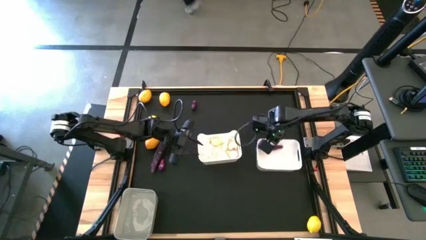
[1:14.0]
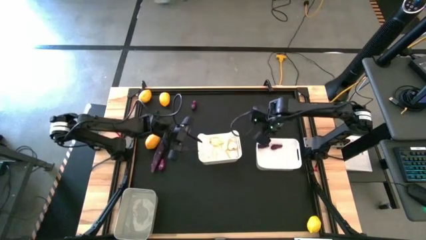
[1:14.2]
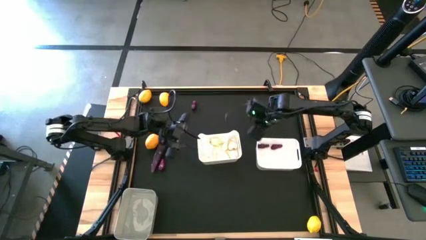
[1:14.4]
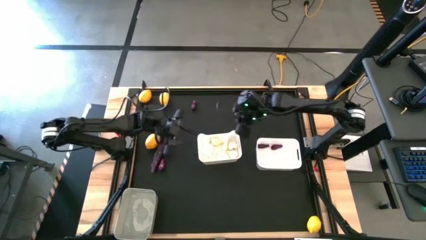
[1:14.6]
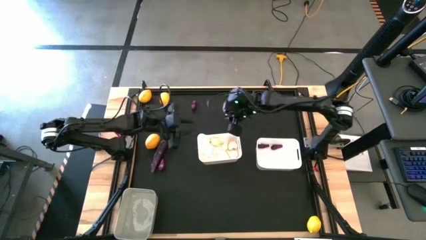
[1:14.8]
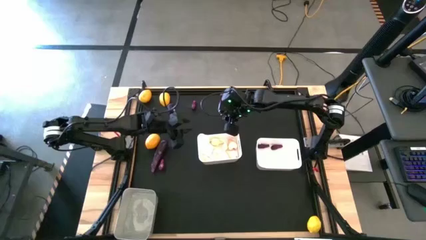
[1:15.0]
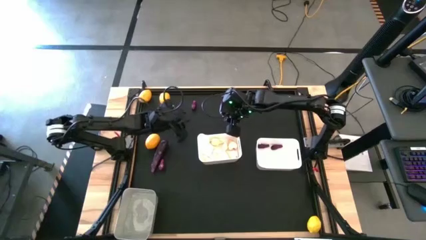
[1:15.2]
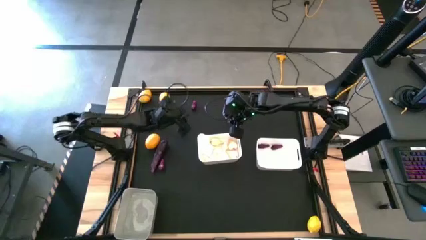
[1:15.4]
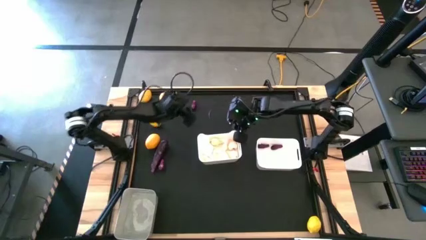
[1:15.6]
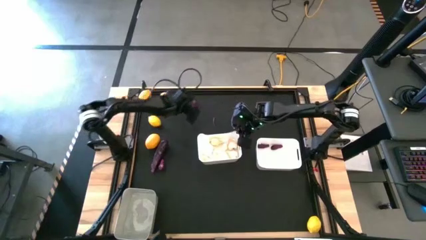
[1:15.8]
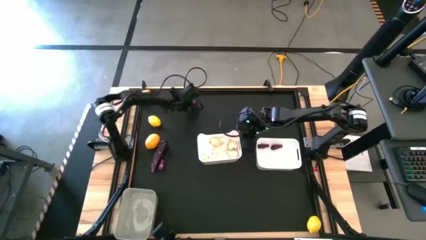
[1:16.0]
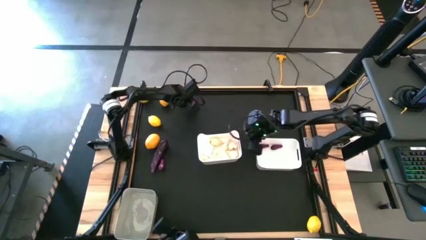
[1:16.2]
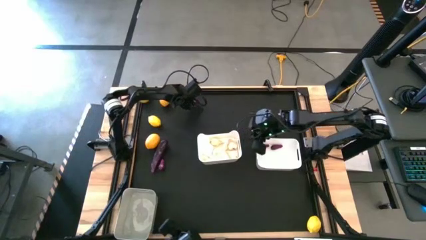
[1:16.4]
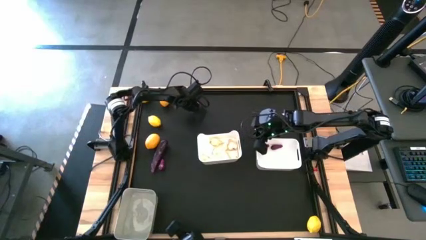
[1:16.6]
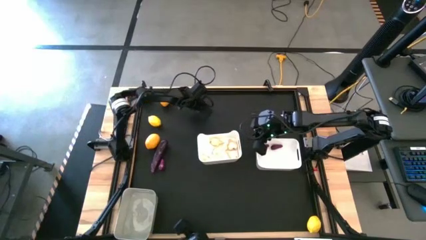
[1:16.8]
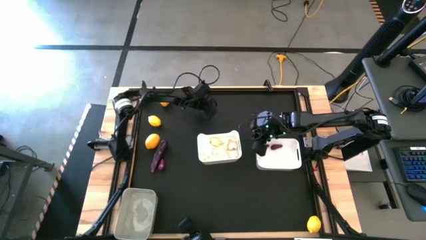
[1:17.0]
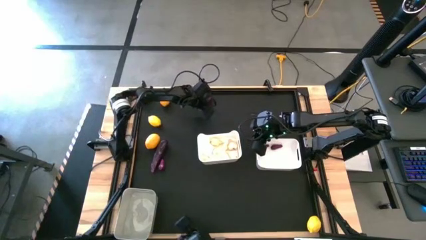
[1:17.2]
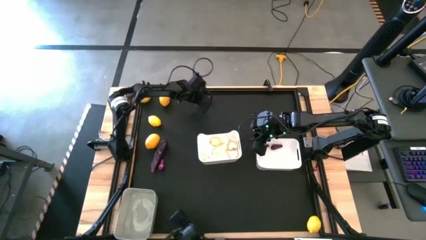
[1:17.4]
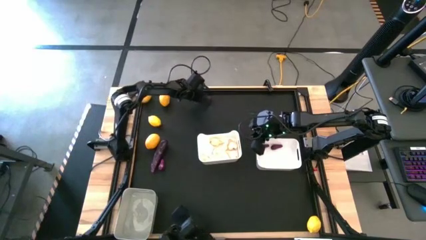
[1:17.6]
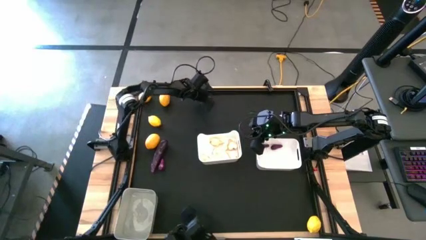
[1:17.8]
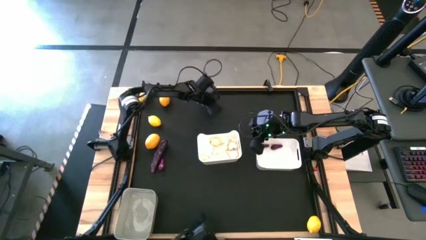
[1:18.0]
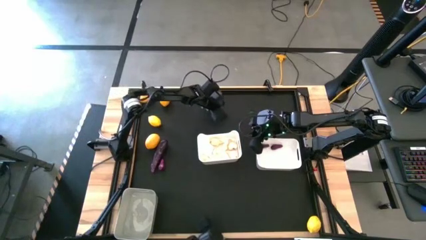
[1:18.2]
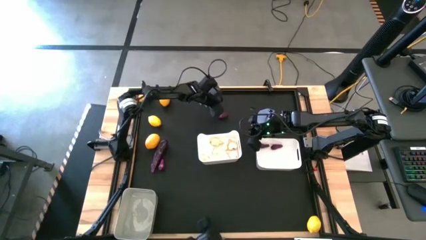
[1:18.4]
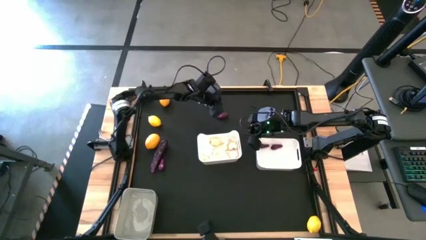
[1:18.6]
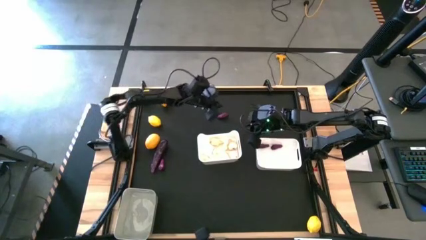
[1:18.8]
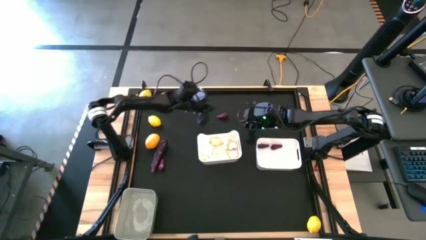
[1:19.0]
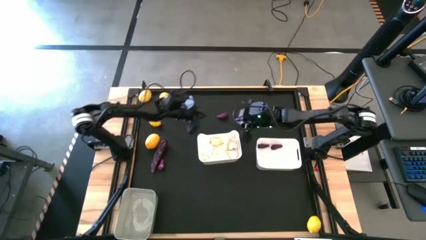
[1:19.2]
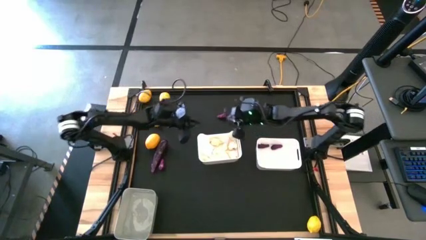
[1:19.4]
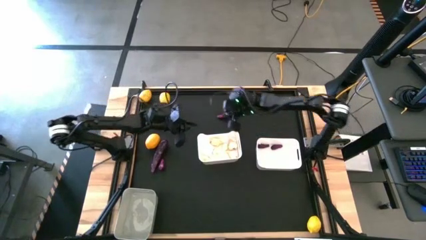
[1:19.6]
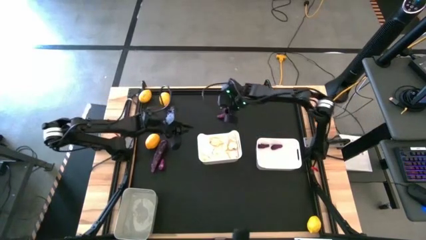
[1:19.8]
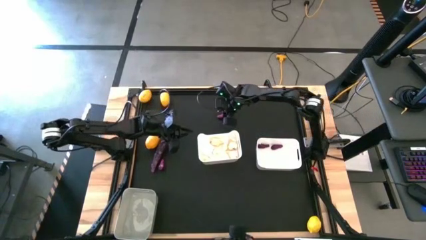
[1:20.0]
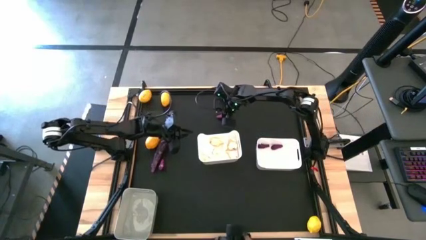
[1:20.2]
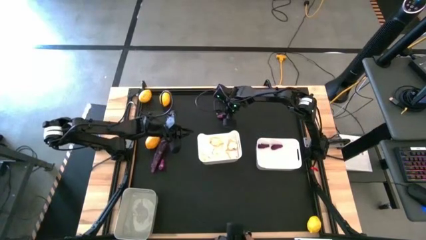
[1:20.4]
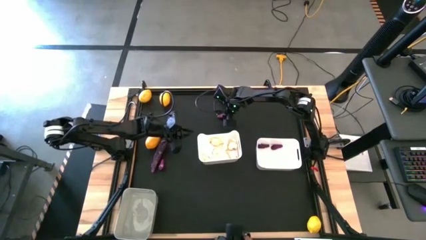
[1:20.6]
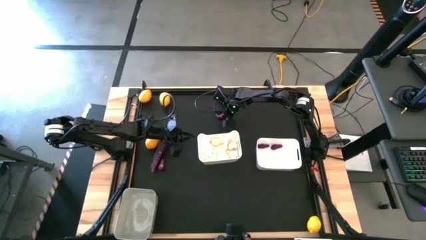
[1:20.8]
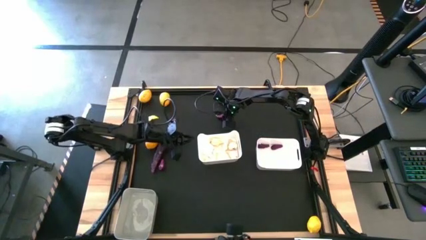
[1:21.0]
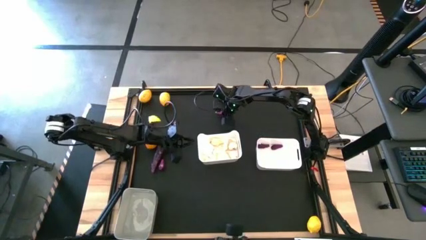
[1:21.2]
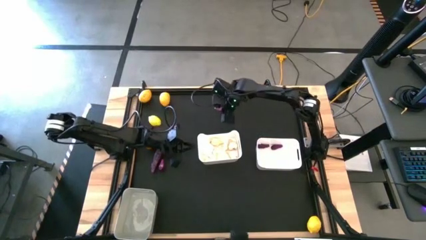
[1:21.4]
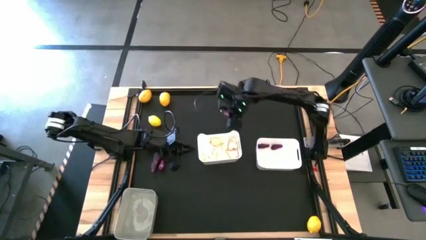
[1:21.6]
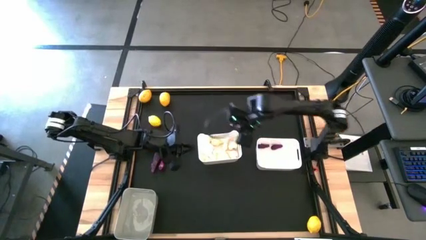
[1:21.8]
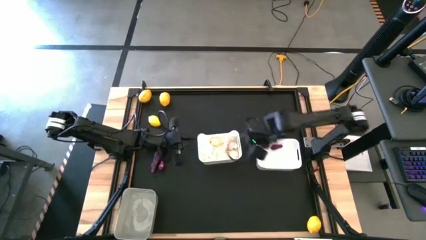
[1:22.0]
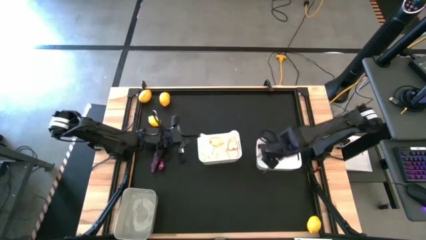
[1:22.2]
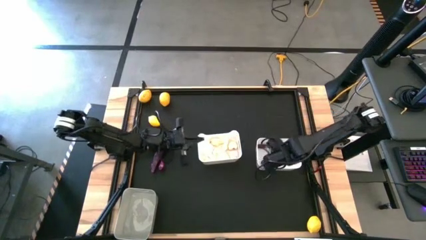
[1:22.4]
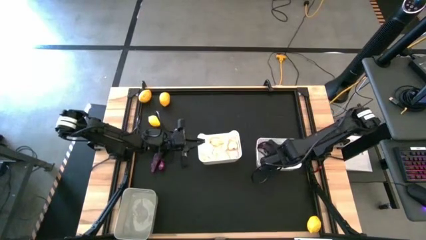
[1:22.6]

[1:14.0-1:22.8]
Task: Sort produce into baskets
Put the eggplant into the right white bin

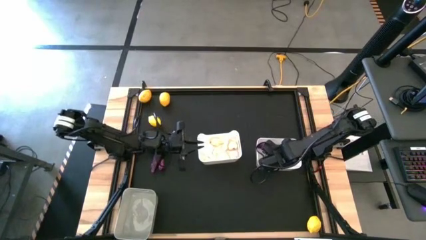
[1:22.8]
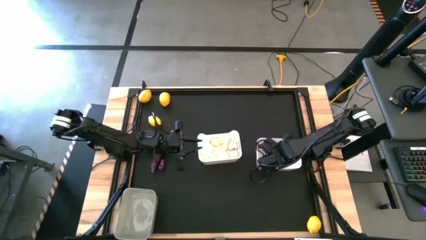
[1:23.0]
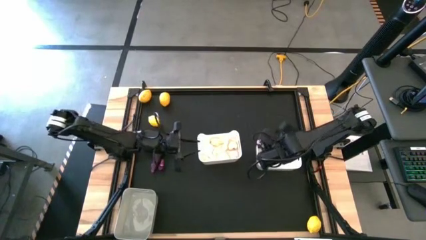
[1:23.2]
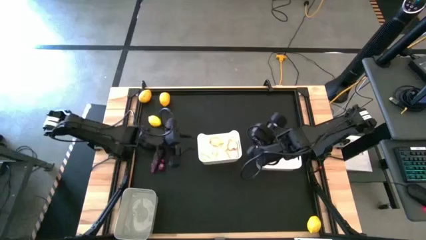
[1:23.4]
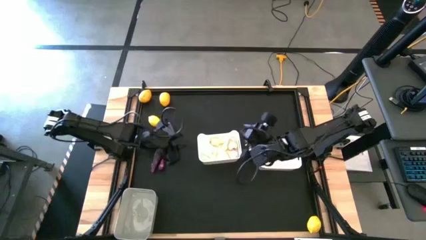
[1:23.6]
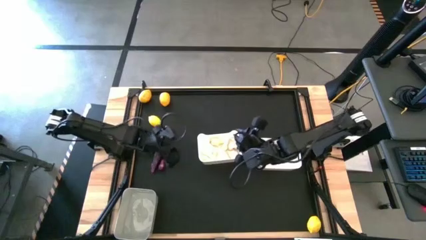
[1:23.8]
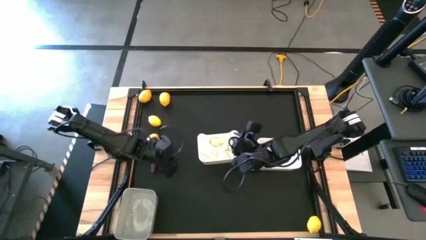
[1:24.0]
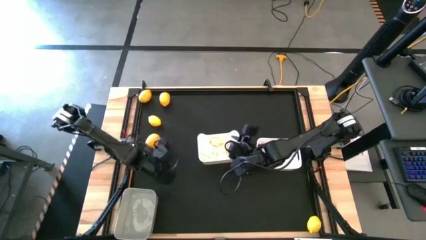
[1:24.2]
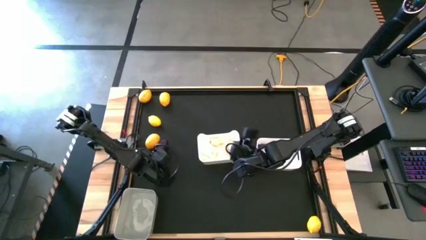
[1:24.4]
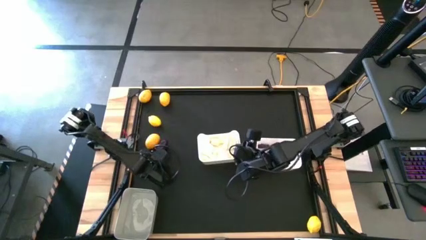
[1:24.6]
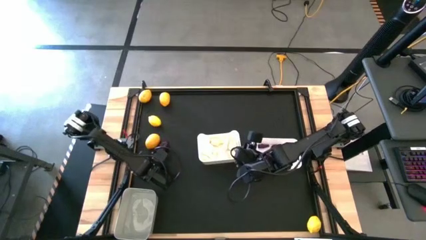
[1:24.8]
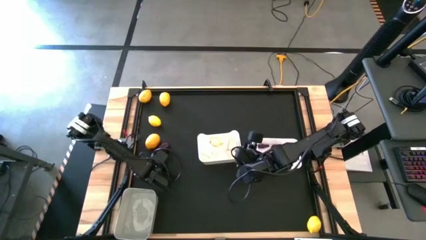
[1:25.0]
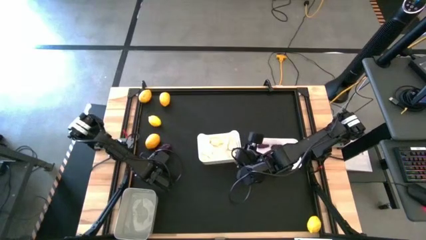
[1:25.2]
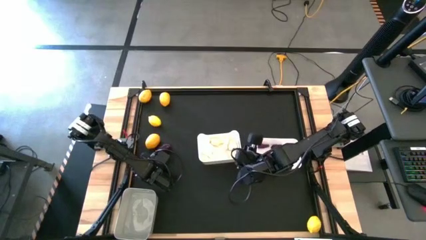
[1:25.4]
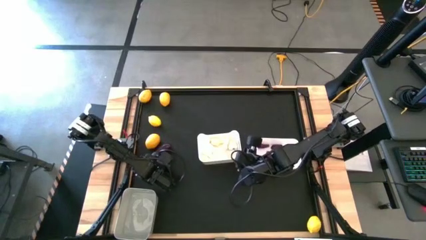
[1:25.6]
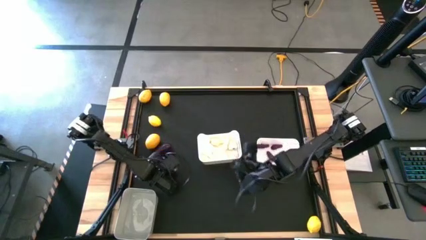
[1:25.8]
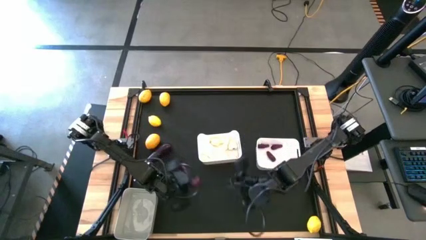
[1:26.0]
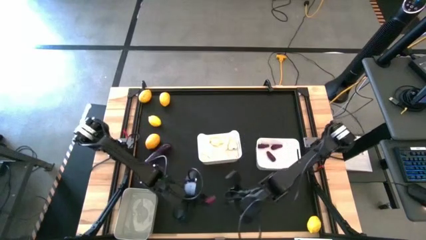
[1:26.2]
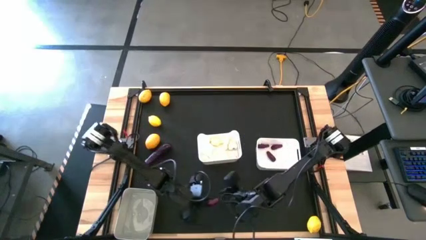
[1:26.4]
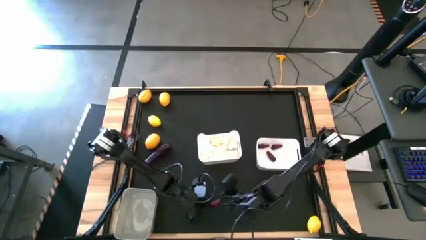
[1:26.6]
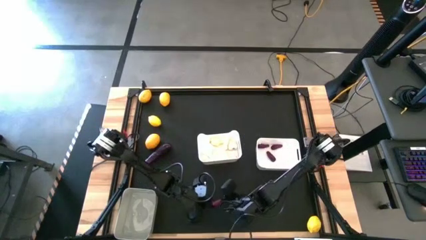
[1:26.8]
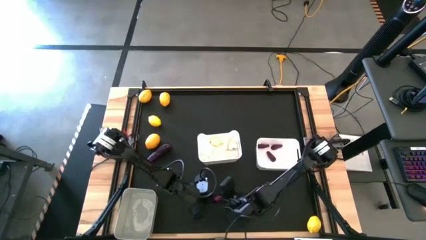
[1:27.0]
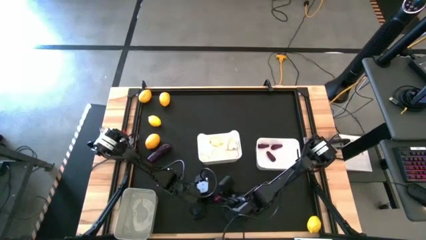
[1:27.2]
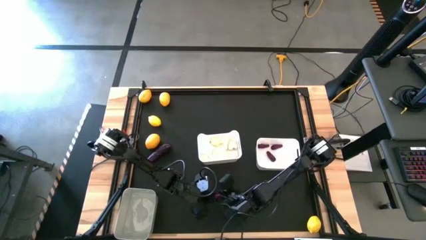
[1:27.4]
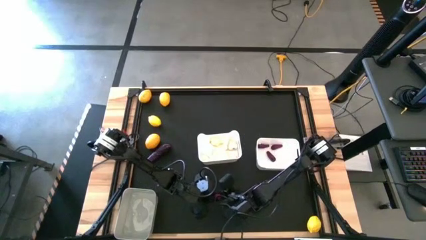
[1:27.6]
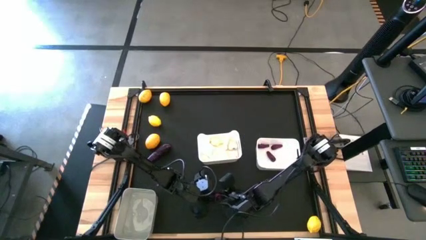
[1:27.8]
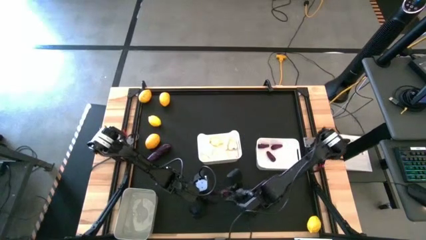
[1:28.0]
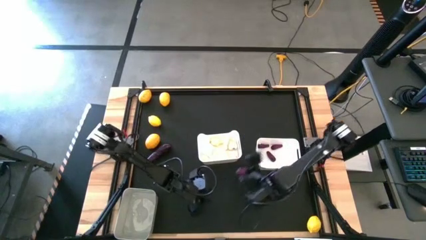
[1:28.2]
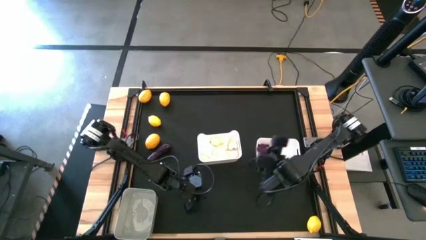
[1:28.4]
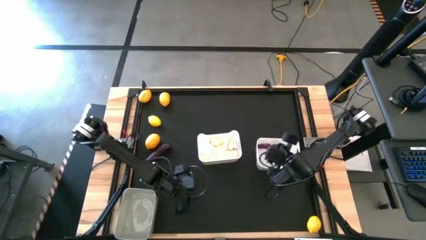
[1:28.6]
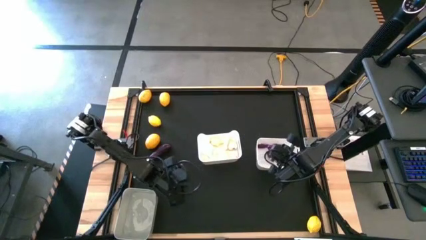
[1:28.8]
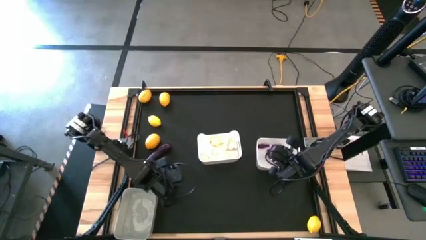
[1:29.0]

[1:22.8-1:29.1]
Put the eggplant into the right white bin
